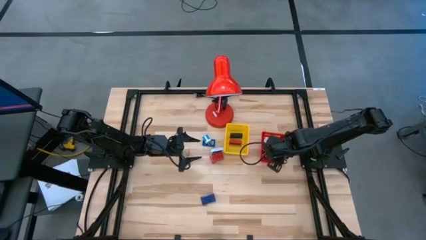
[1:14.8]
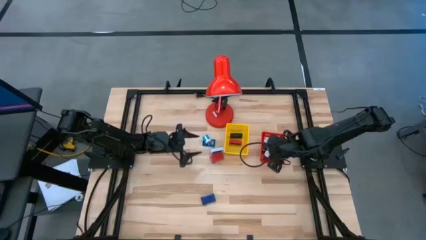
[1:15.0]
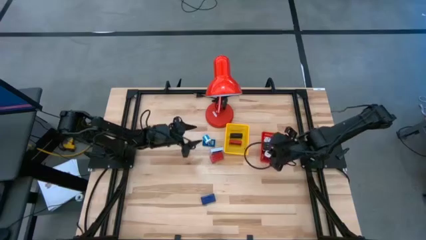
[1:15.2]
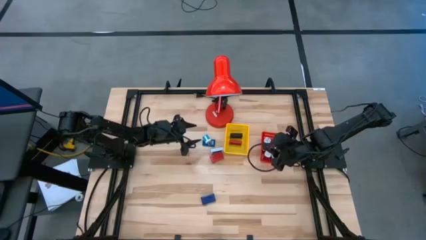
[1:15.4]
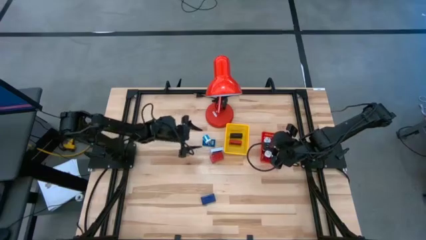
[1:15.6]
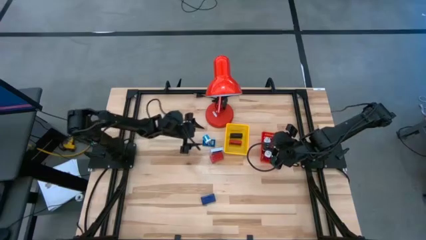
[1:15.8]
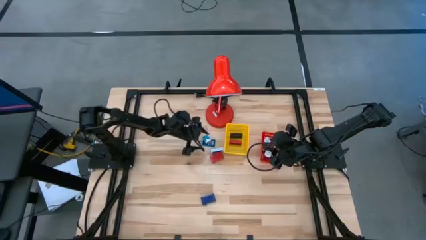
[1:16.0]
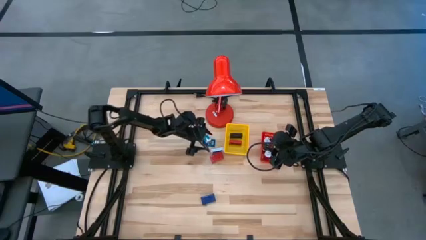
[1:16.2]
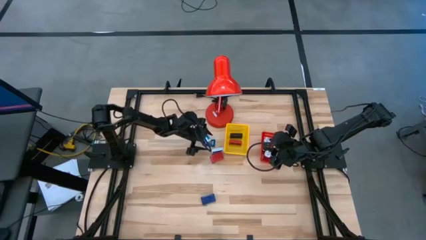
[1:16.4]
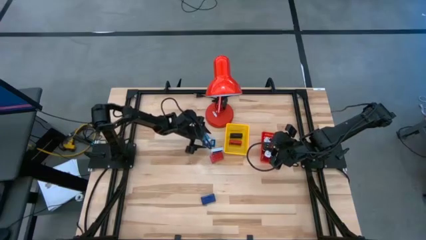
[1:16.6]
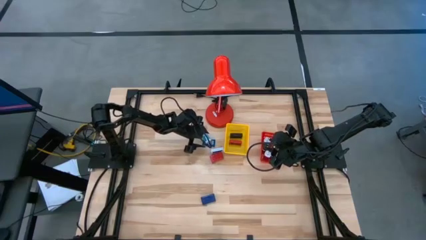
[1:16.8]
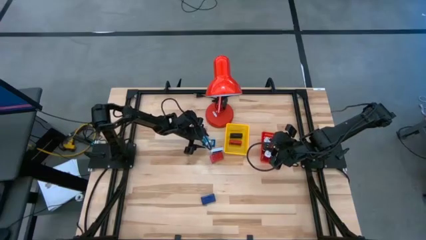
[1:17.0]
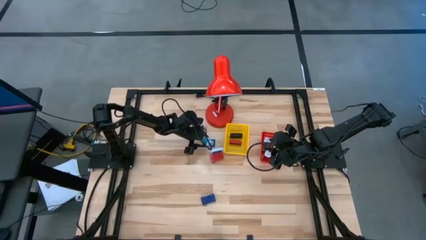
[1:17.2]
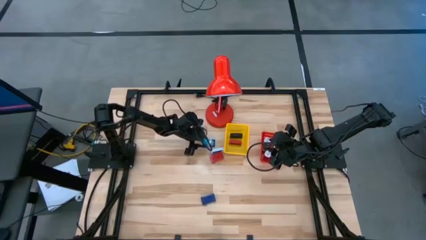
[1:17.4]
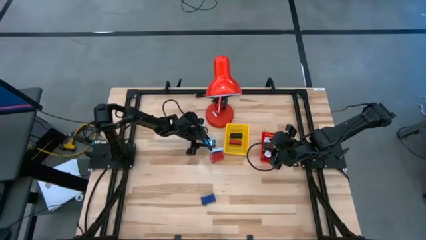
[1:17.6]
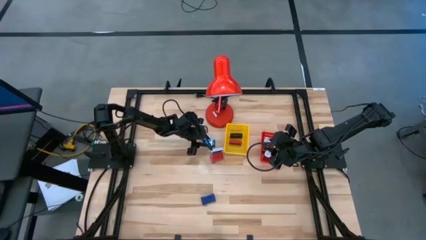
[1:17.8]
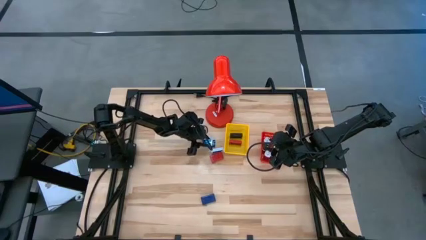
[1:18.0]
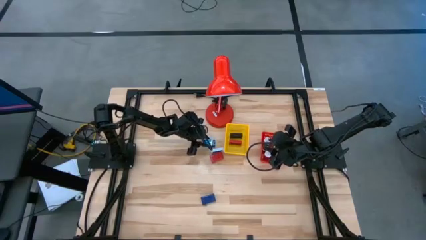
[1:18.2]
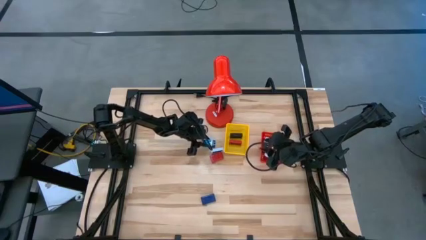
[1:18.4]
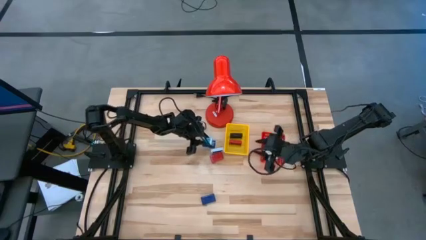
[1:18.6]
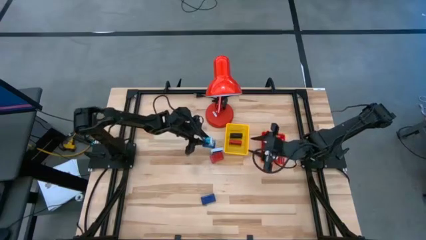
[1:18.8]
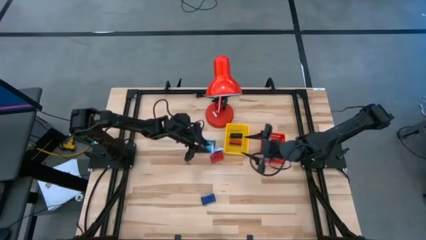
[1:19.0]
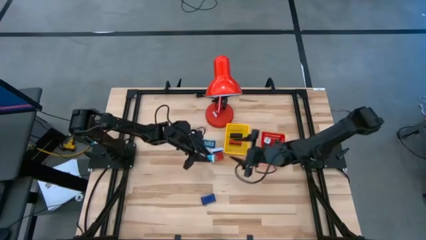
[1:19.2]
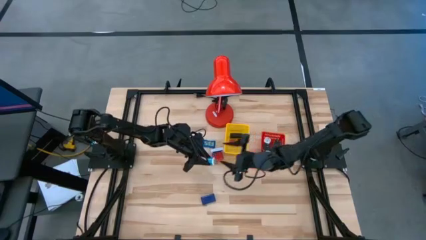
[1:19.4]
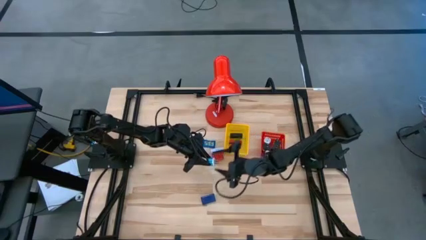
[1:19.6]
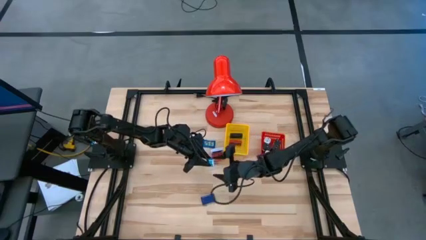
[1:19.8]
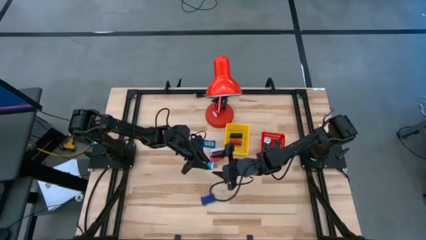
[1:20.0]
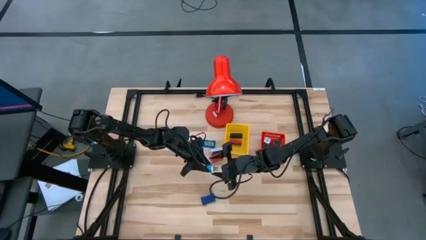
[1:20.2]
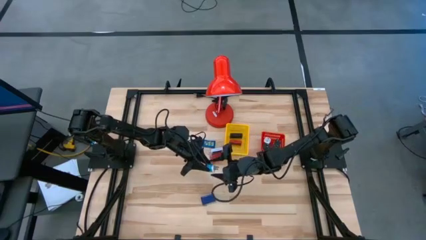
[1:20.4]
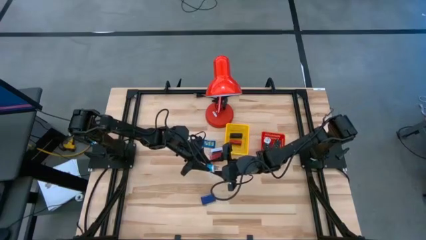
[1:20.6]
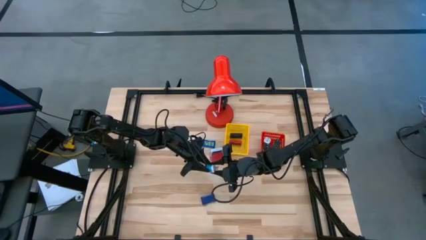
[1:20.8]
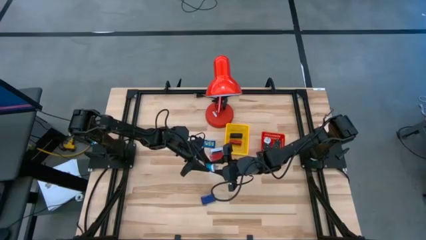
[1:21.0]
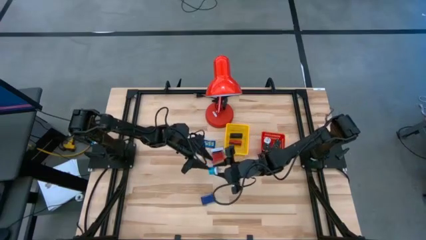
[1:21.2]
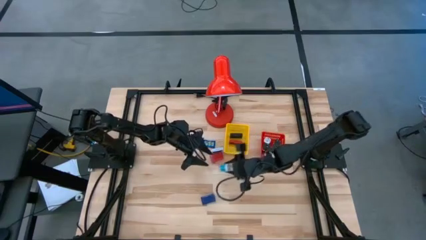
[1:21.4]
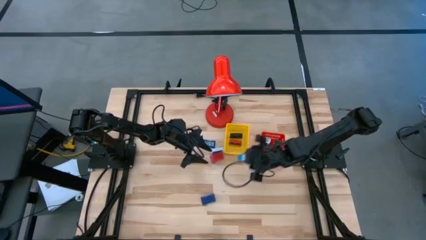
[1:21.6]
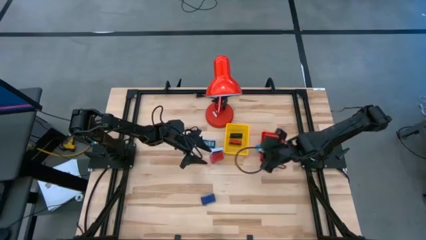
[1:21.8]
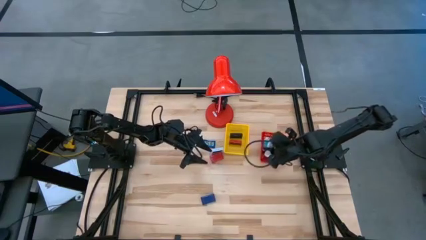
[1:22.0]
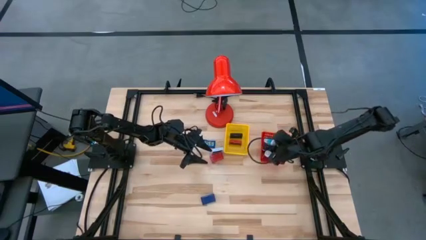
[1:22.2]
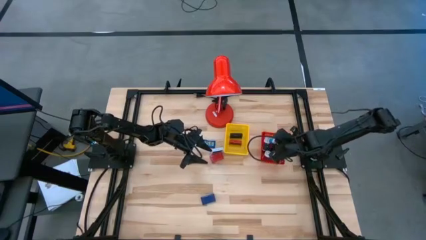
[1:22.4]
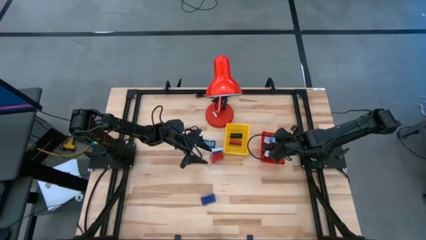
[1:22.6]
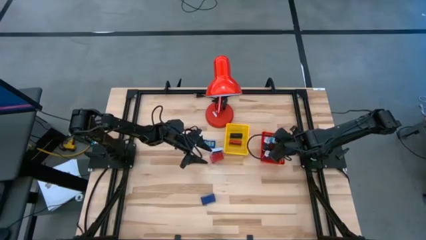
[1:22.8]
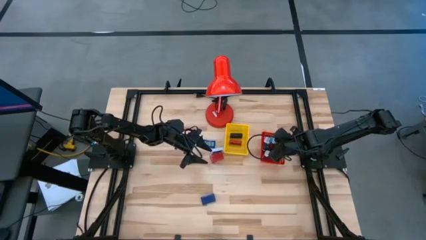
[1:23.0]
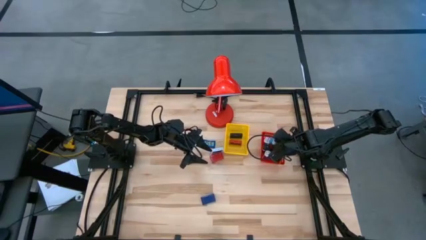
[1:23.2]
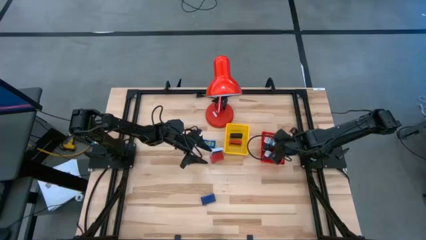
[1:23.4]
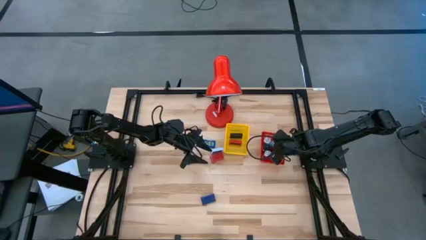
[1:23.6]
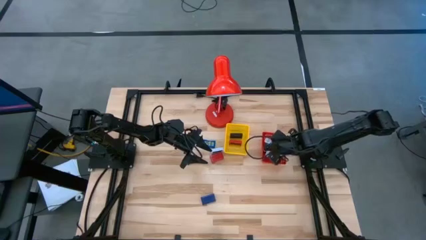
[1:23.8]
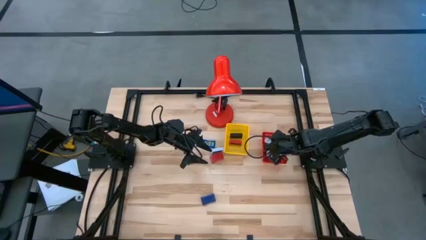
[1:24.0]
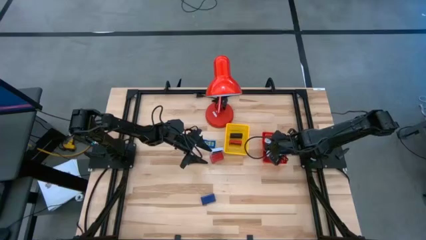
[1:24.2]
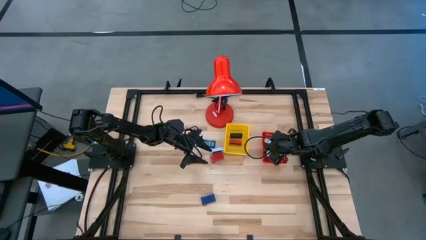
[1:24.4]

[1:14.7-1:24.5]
Task: Pick & Place Office items
Put the blue charger adapter into the red bin

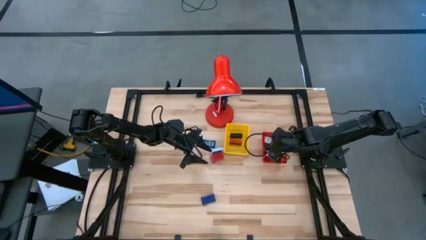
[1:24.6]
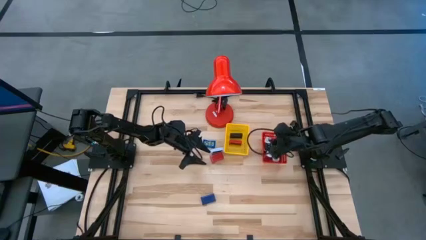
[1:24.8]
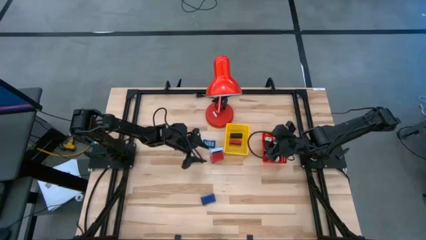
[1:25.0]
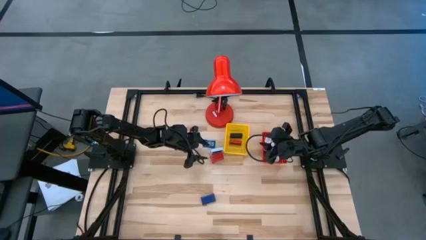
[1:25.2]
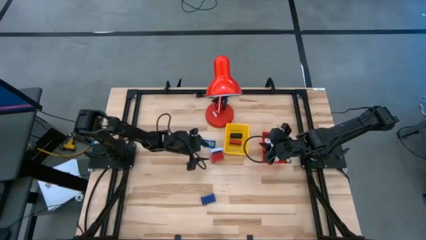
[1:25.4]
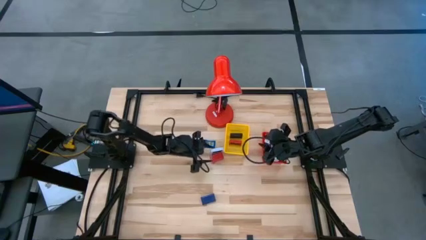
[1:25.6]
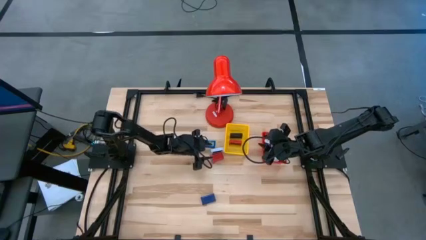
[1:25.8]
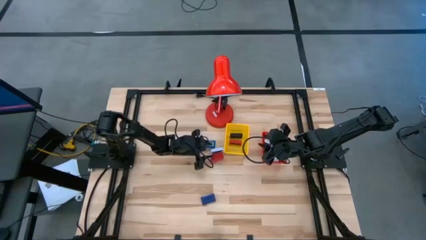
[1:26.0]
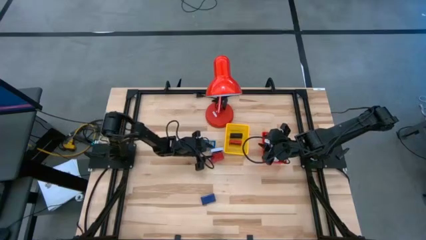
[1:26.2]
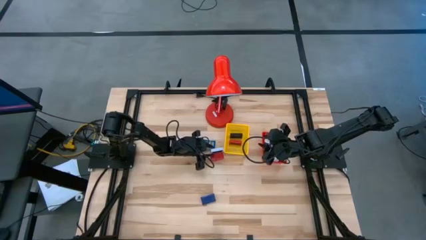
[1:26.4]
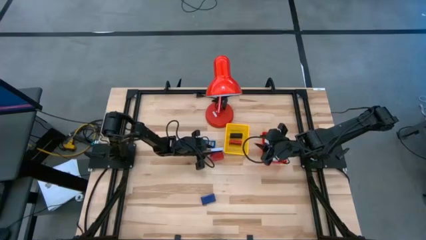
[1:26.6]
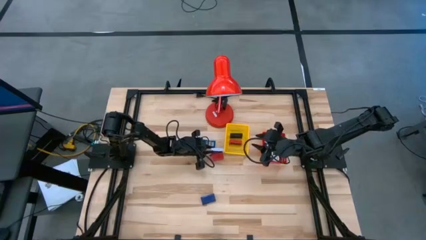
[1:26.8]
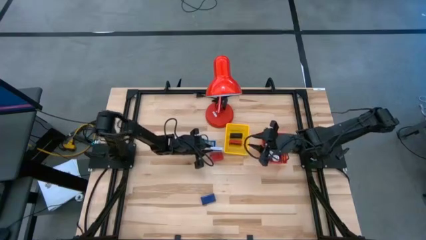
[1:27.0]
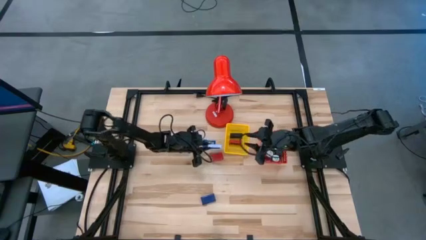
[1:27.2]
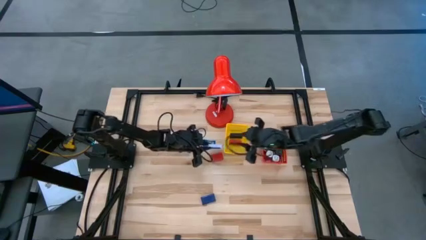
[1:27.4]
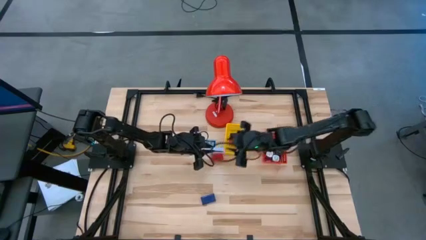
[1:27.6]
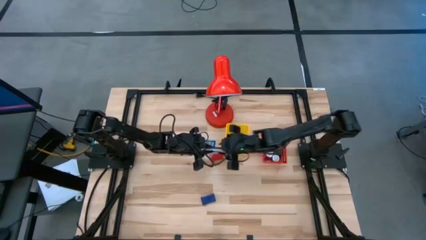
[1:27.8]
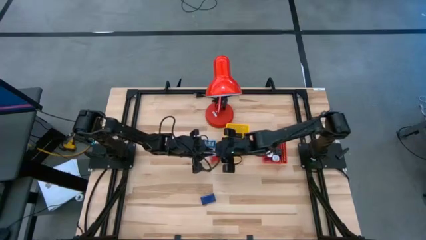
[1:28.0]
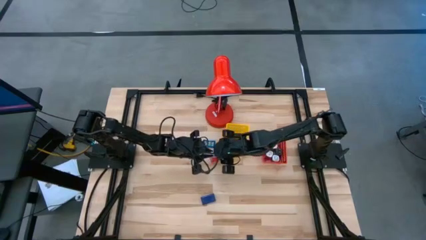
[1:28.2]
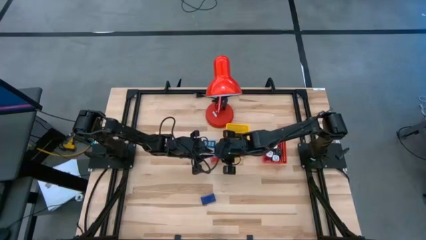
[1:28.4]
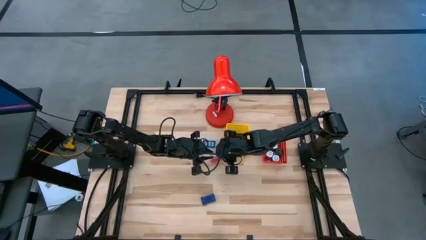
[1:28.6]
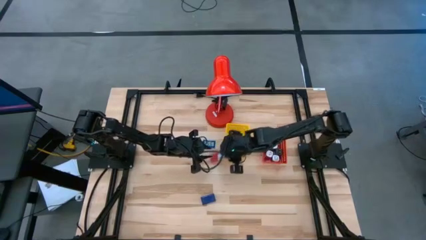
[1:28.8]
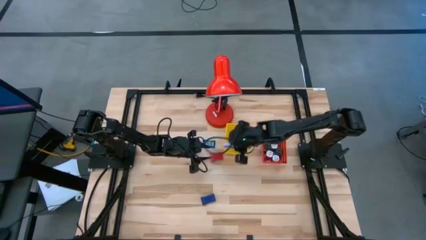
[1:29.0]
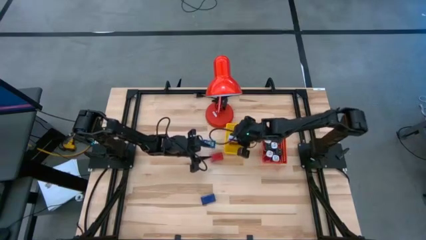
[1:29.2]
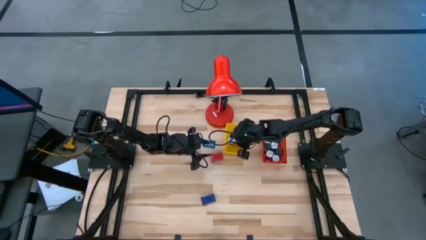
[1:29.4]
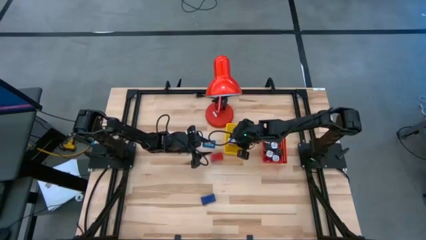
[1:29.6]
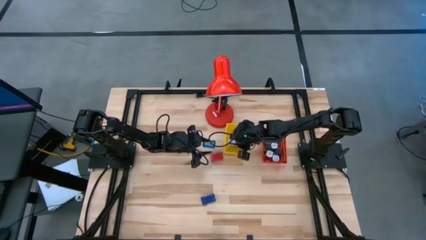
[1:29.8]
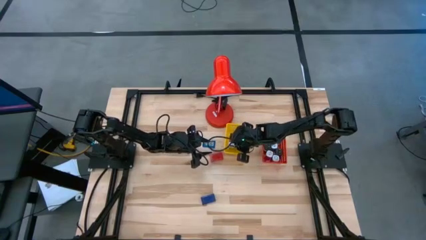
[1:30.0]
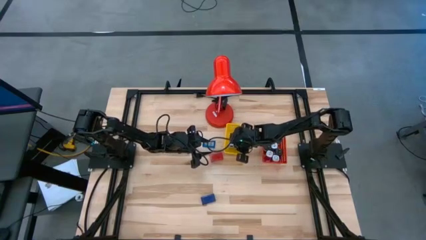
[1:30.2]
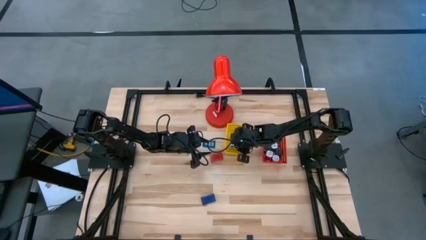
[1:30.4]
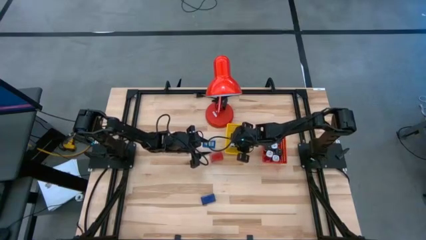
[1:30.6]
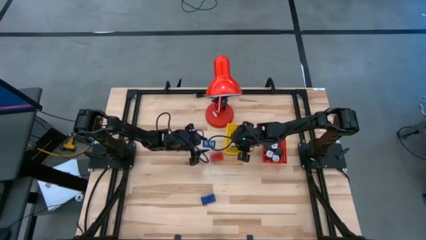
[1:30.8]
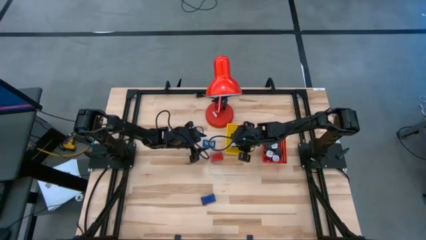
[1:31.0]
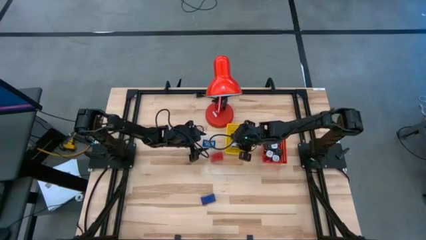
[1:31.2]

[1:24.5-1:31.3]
Put the white digital clock into the yellow bin

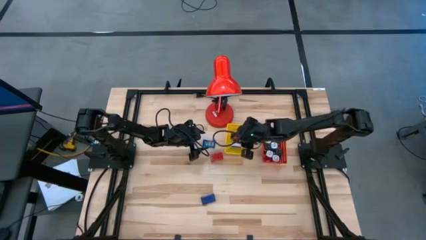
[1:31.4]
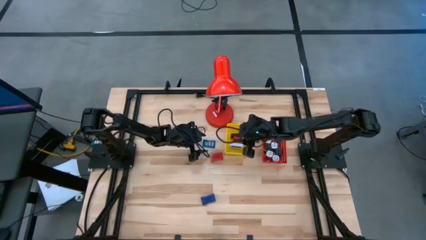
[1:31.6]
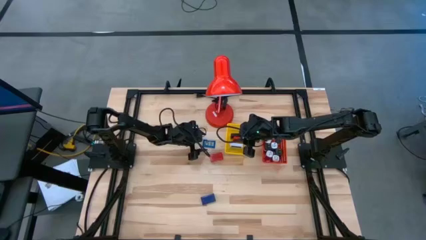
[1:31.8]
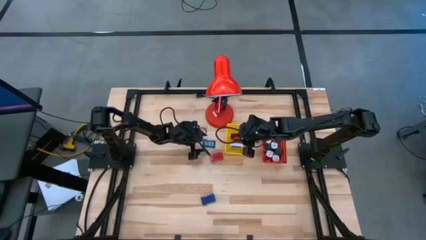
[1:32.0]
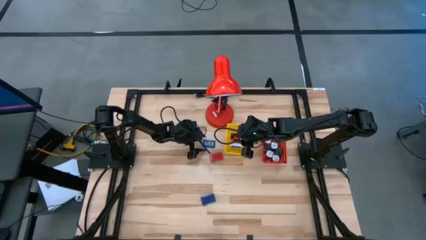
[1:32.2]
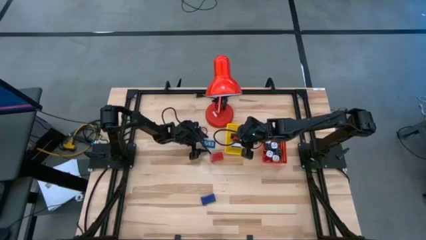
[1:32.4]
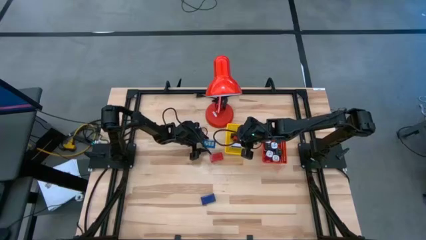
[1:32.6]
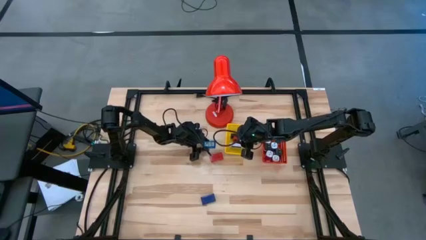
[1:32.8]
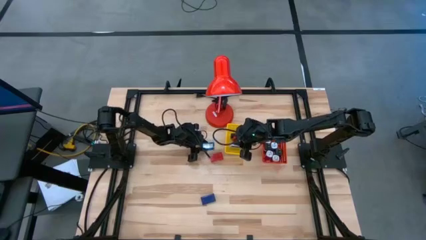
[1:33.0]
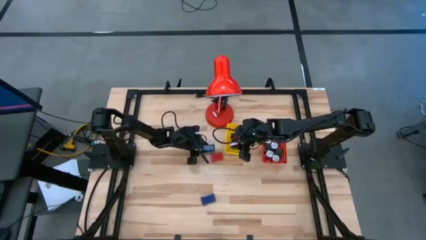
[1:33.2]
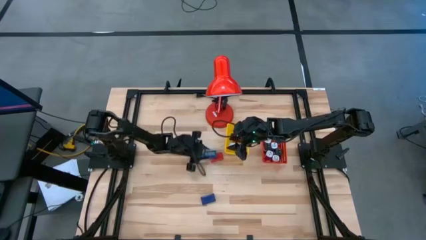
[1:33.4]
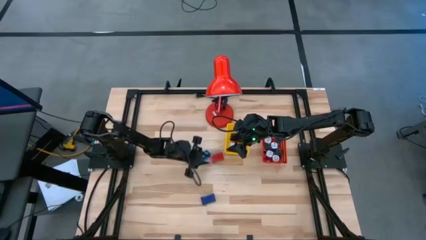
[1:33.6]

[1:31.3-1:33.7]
Put the top blue digital clock into the yellow bin
